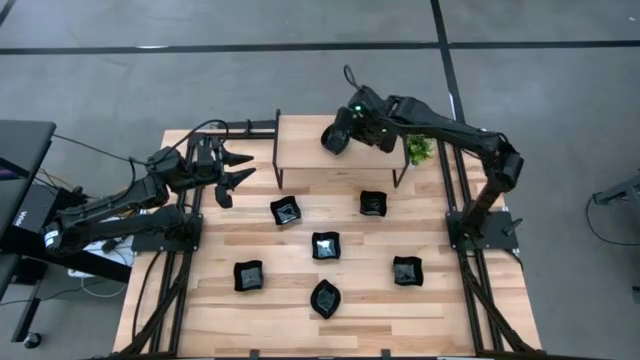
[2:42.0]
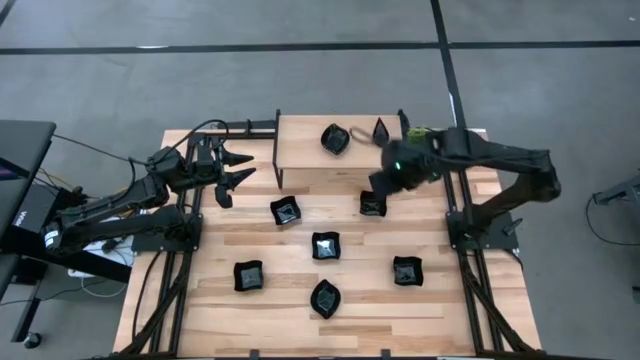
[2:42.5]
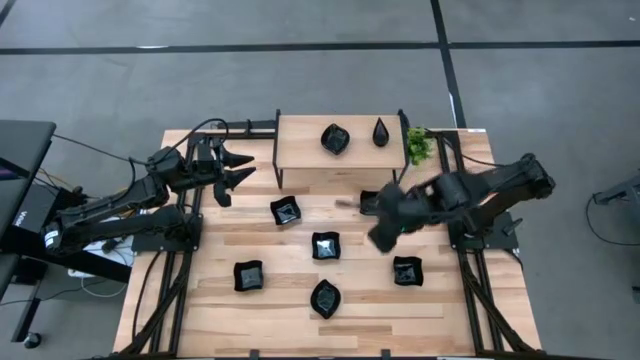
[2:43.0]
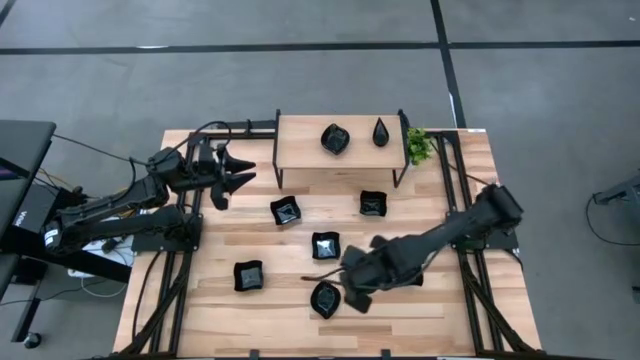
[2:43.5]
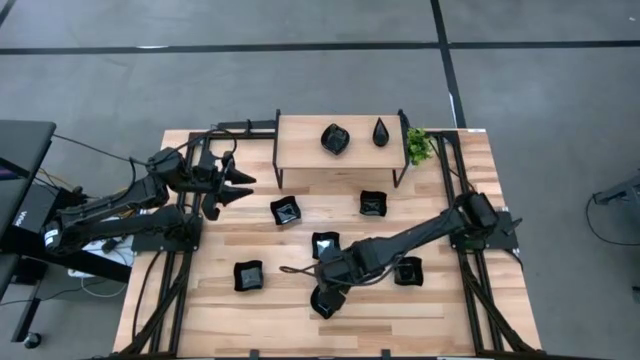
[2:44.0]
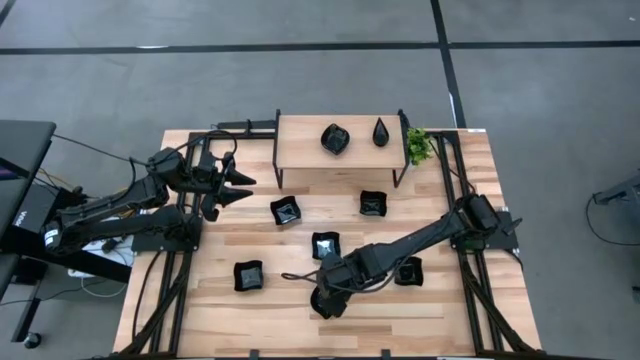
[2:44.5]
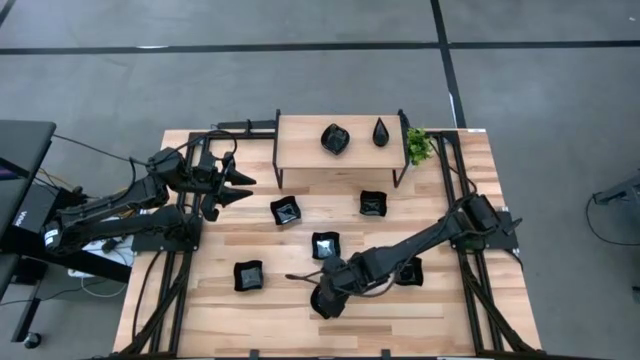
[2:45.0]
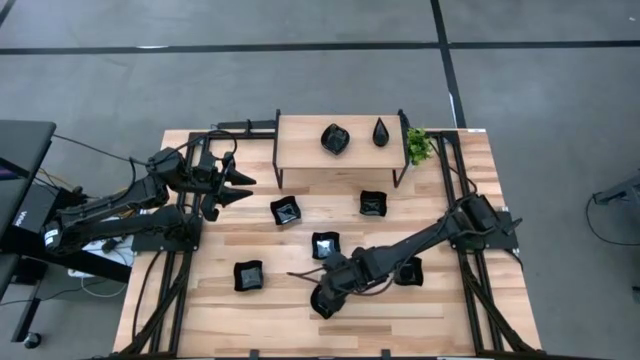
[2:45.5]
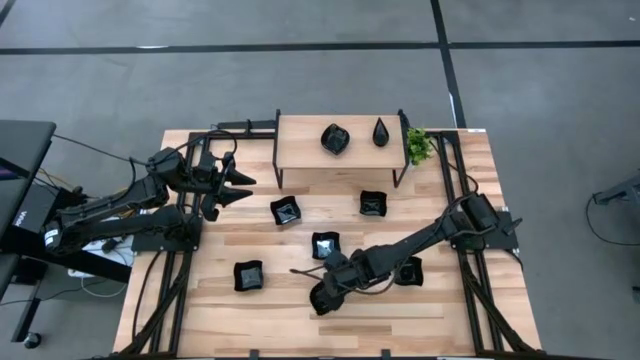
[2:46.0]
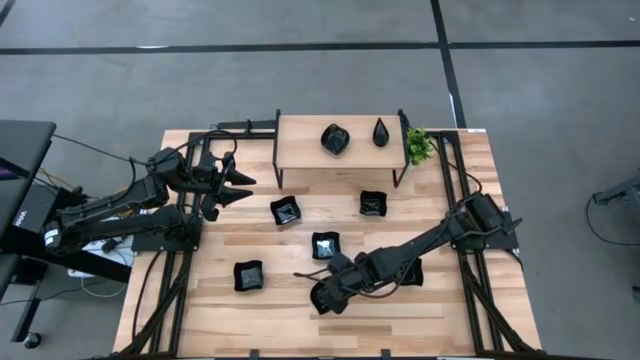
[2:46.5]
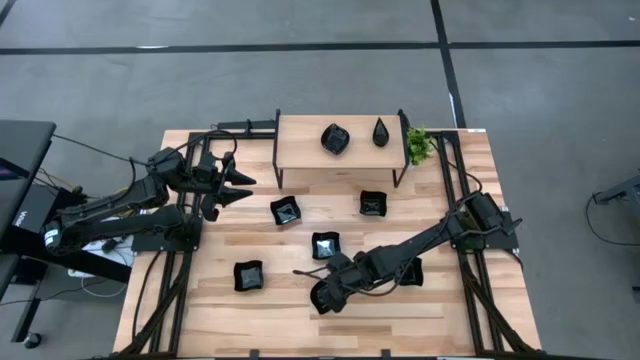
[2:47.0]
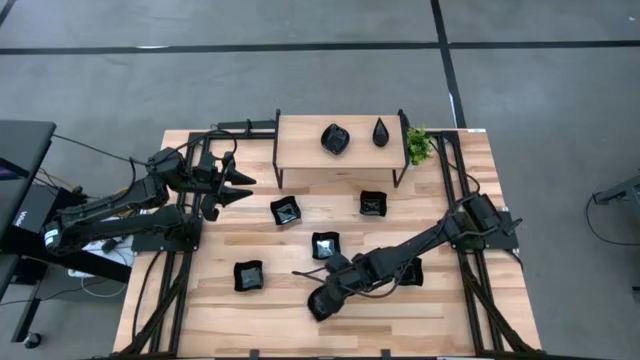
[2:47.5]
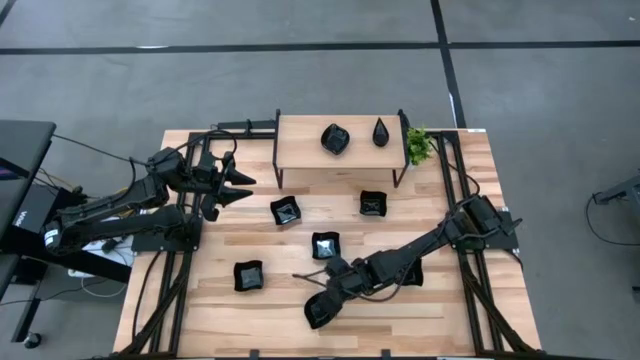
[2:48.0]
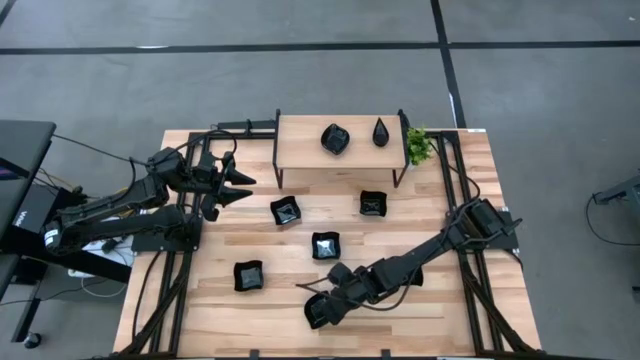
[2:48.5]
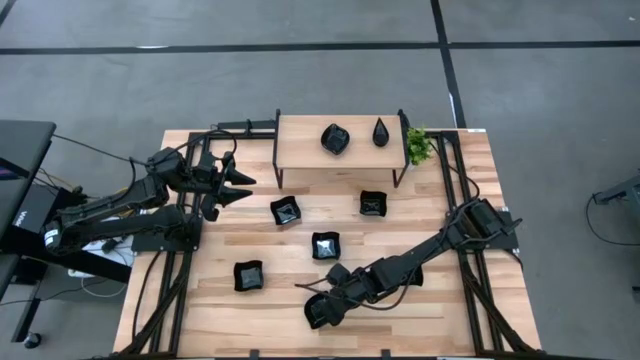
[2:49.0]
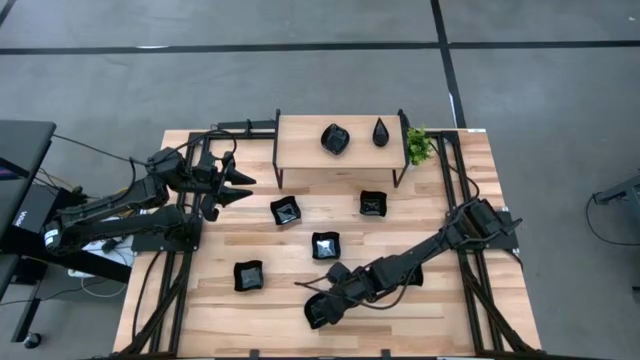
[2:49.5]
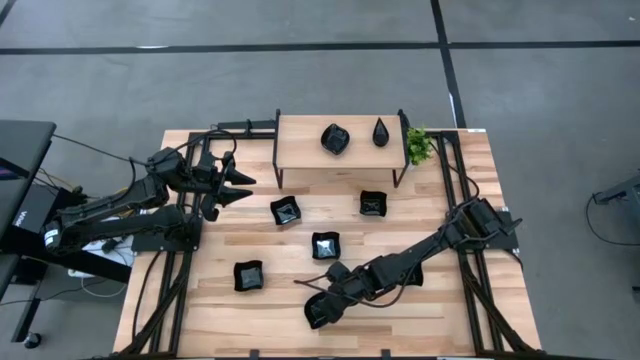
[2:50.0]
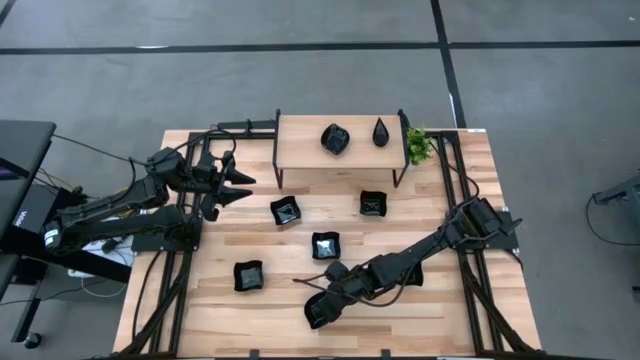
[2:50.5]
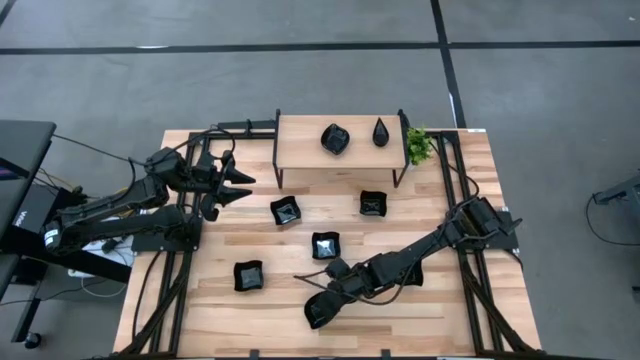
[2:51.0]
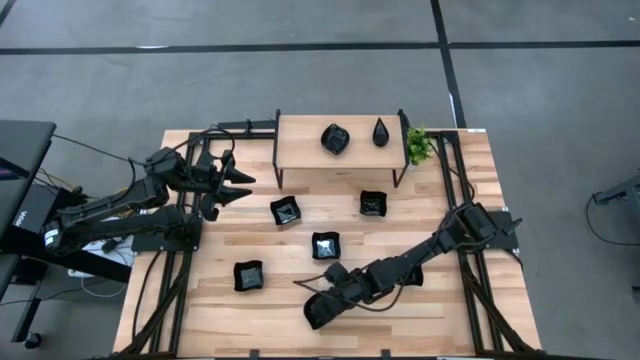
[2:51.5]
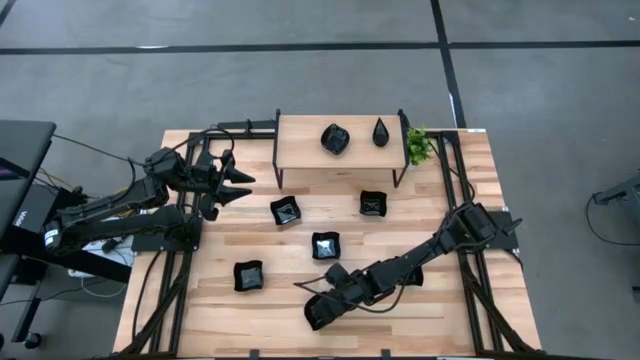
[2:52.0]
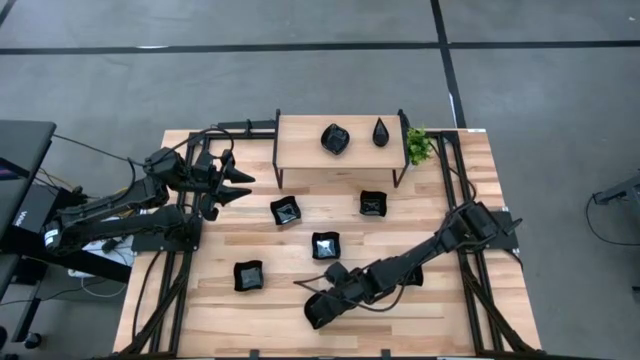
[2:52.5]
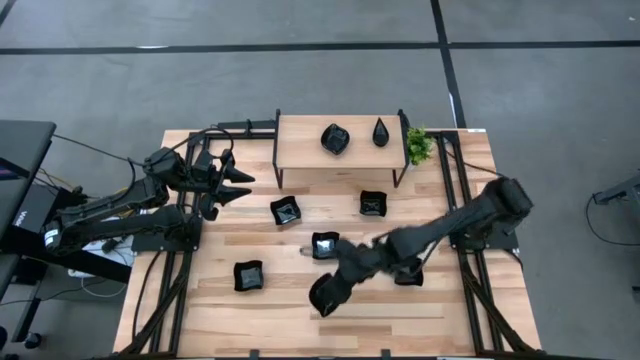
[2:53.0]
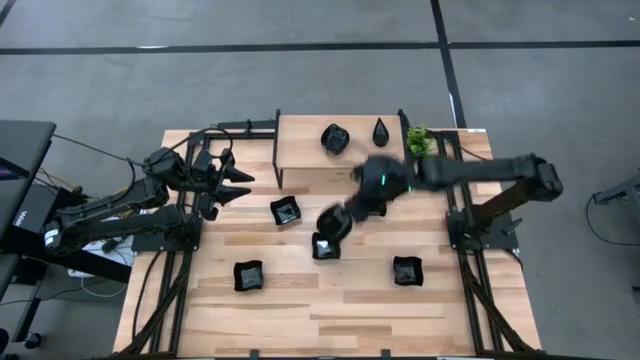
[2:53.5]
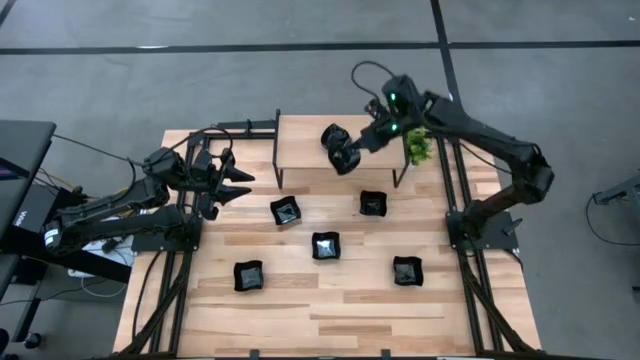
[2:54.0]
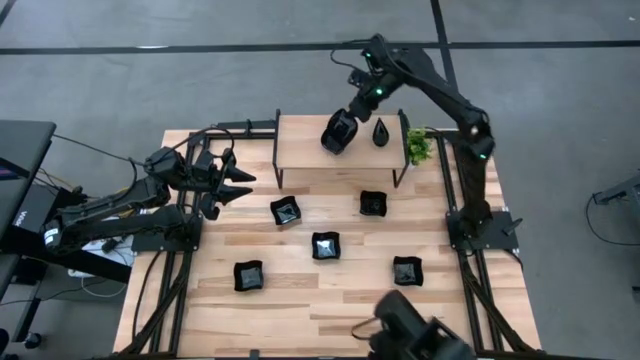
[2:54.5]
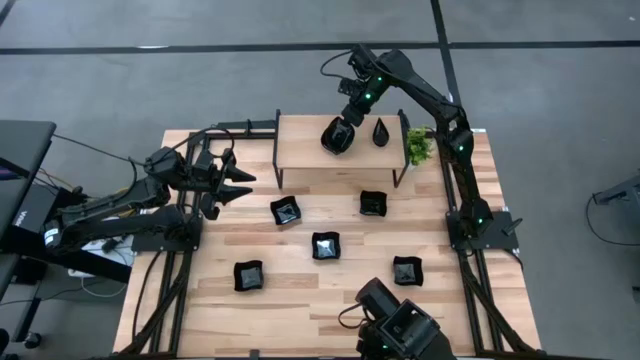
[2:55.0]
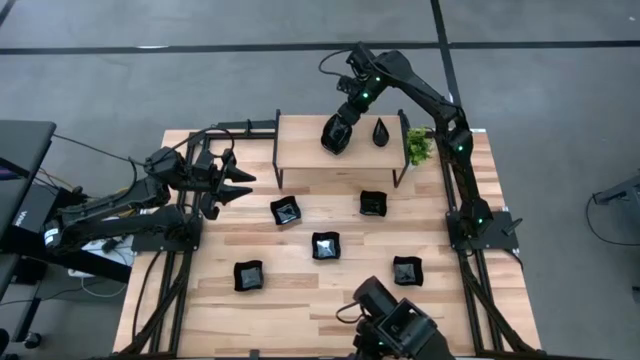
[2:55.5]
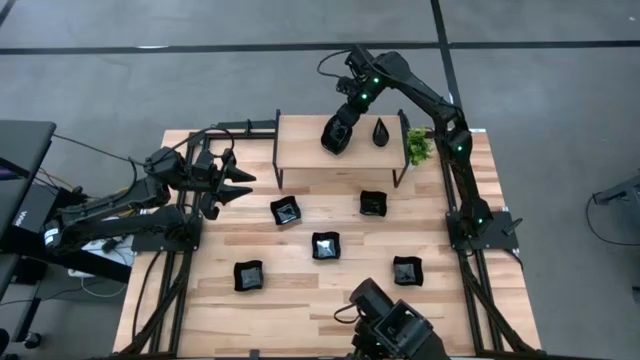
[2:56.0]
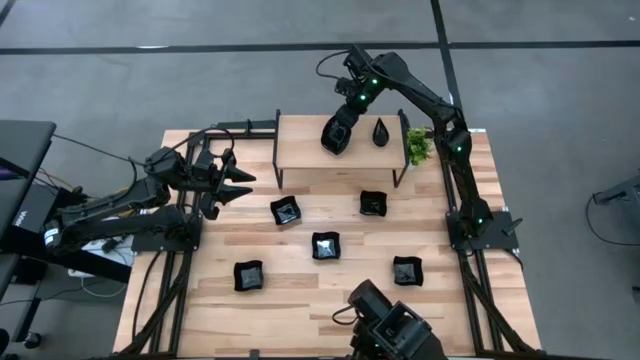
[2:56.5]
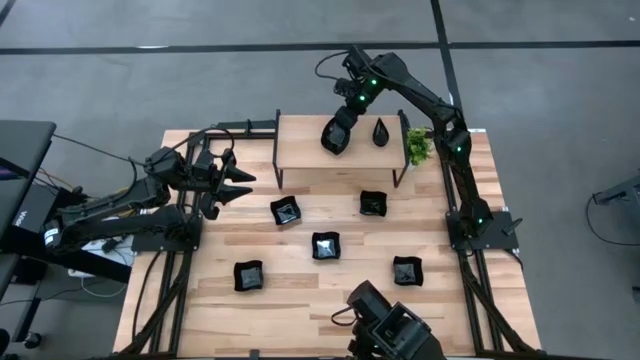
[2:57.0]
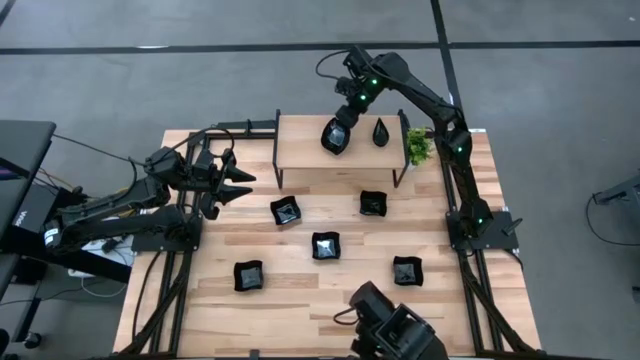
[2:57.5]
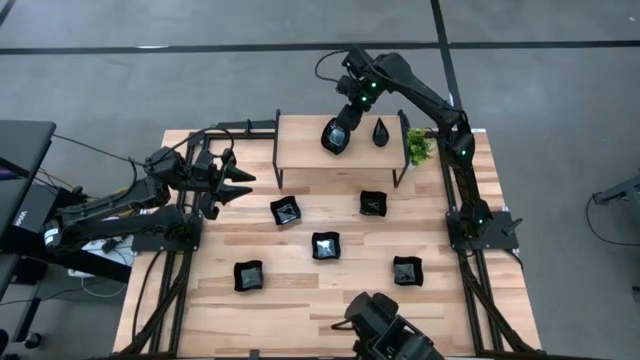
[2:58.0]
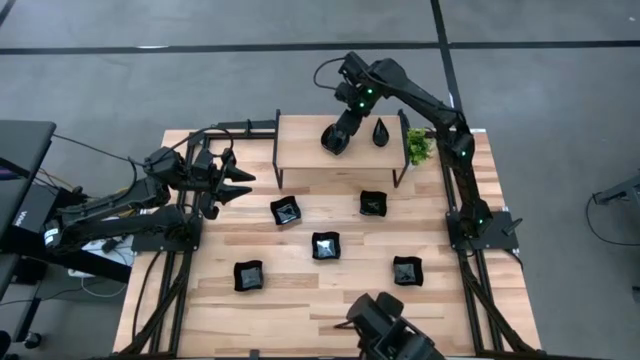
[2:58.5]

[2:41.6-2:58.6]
Task: Pick & Place Mini shaped plates
Stack the leaf-shaped plate on top of the leaf-shaped plates on the shelf

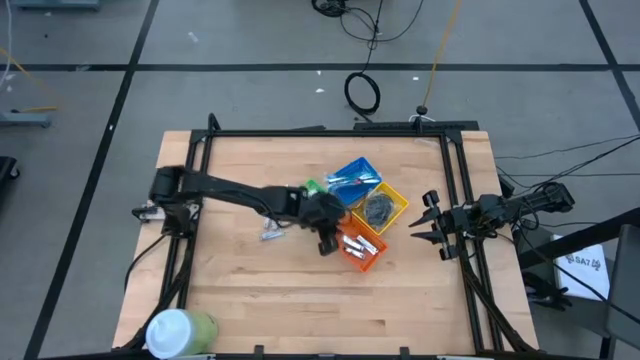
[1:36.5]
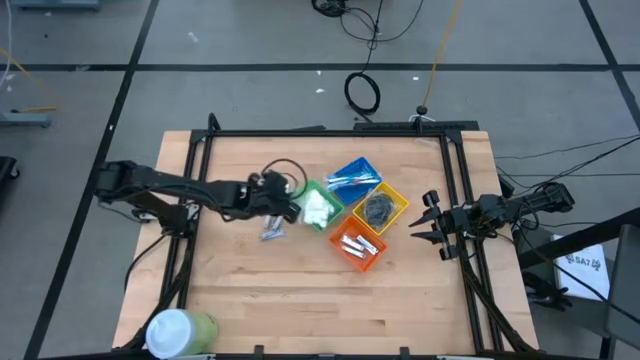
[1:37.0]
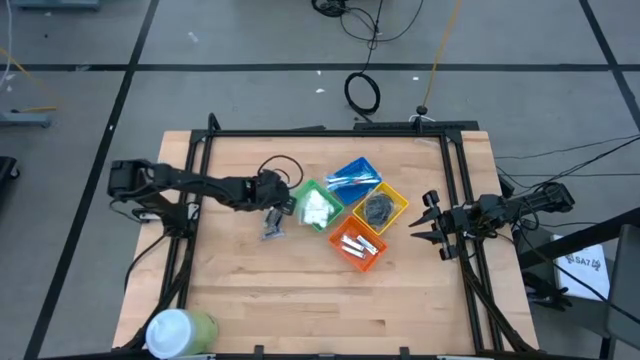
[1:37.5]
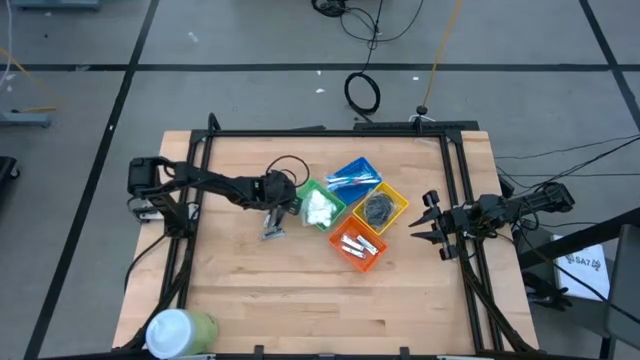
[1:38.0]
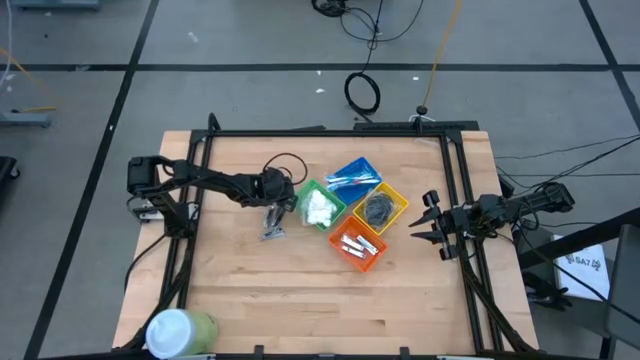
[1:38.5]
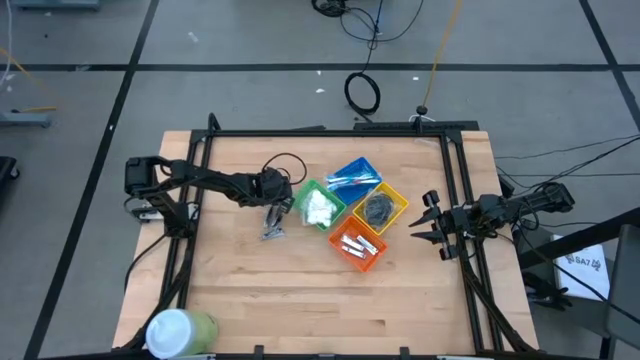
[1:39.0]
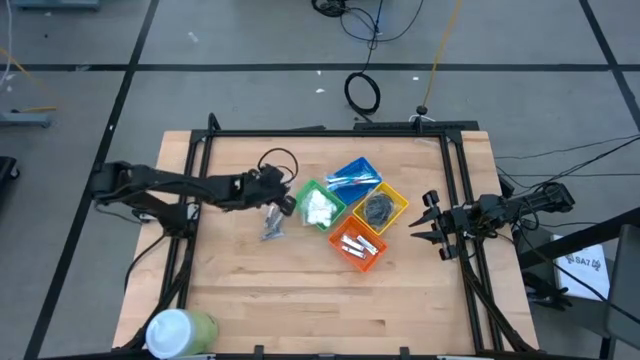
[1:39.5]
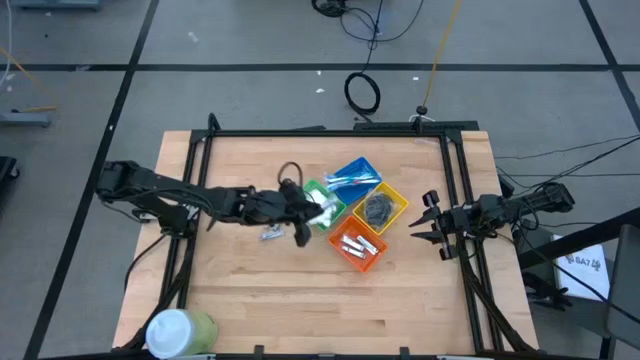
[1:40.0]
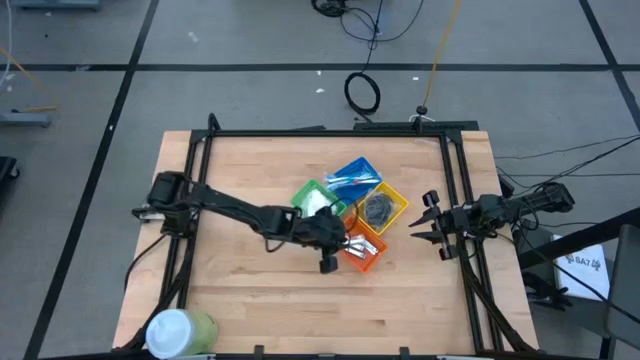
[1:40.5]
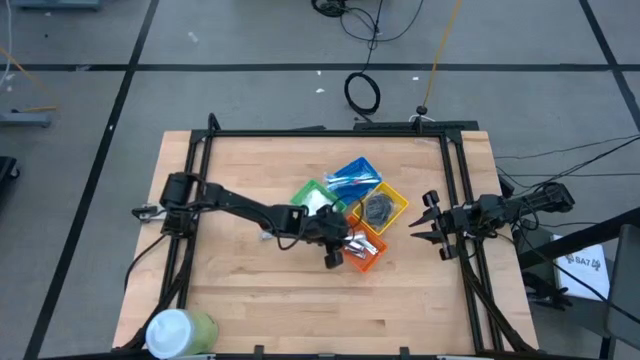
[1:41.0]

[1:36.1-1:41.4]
Task: Pick & Place Travel size toiletries
Put the silver nail cutter into the orange bin
